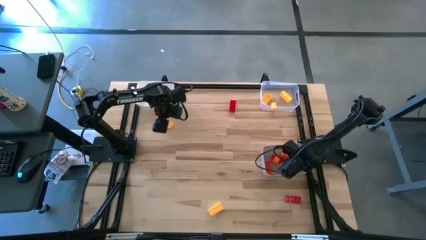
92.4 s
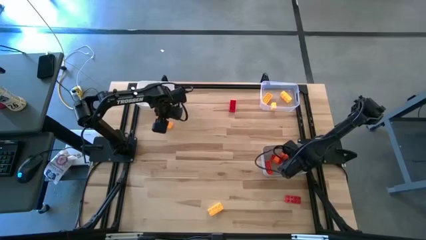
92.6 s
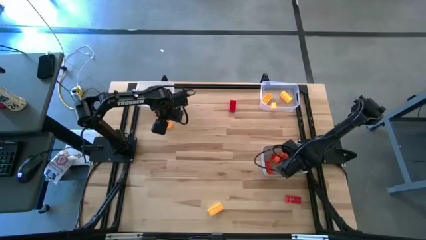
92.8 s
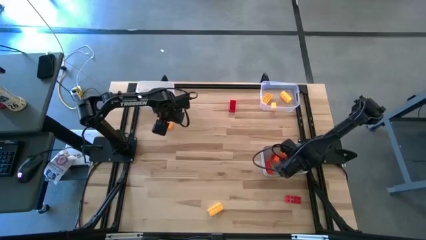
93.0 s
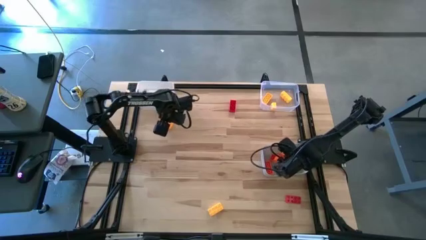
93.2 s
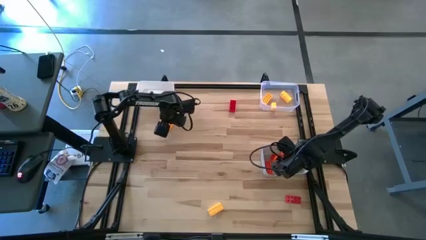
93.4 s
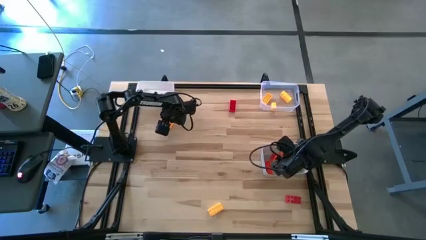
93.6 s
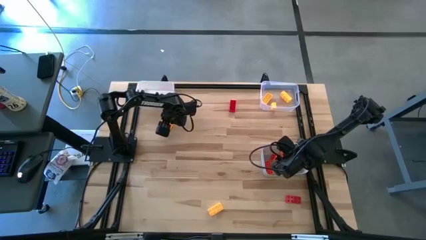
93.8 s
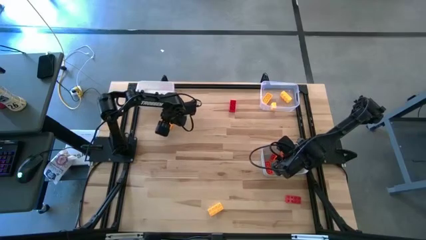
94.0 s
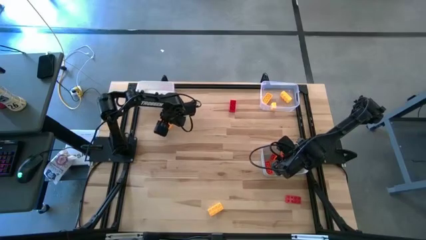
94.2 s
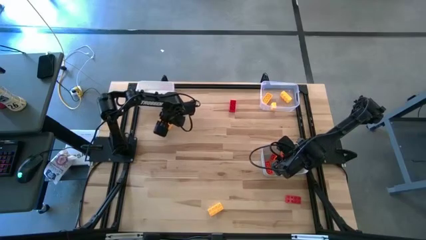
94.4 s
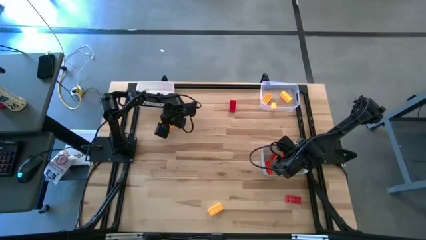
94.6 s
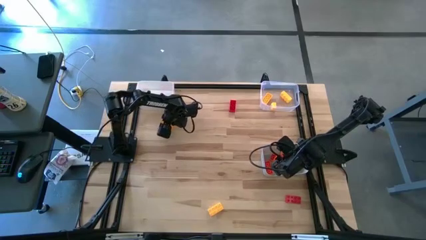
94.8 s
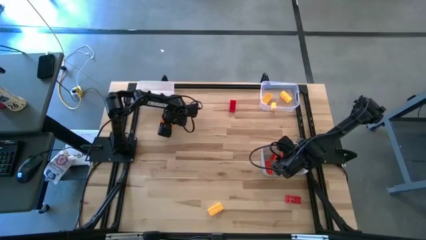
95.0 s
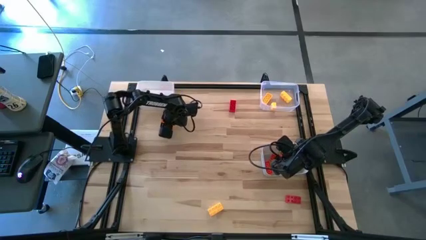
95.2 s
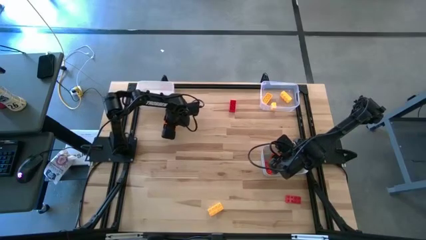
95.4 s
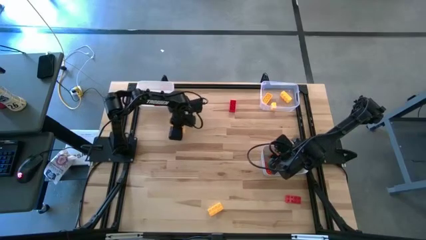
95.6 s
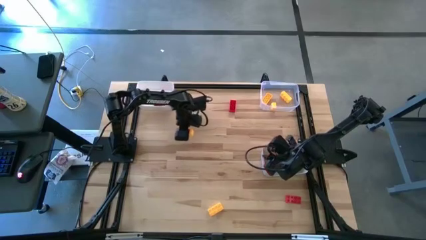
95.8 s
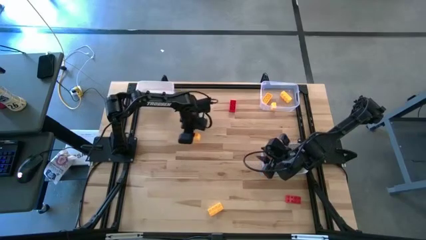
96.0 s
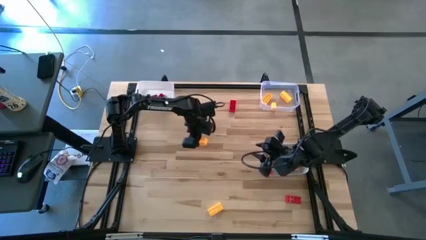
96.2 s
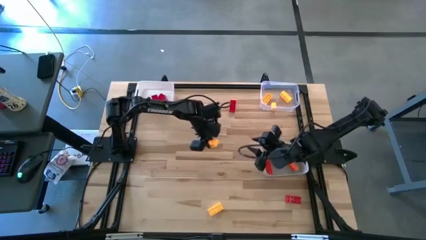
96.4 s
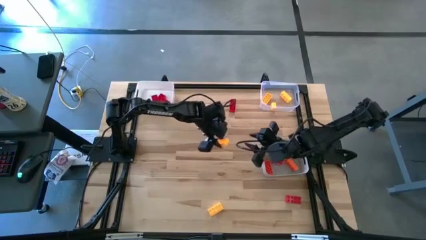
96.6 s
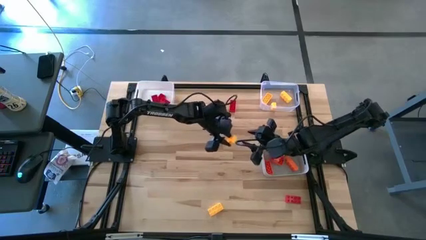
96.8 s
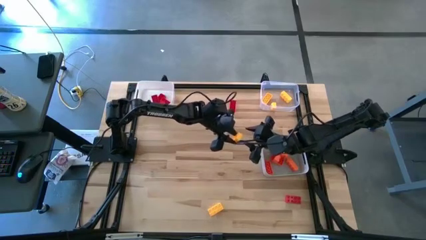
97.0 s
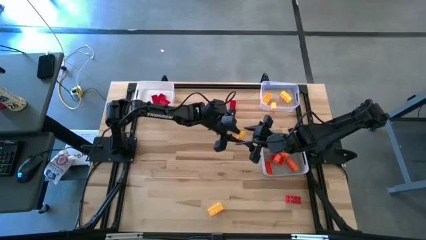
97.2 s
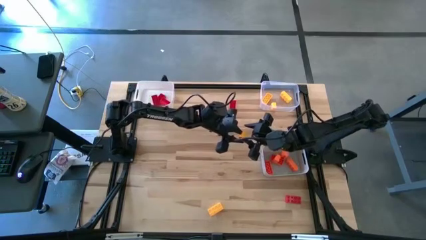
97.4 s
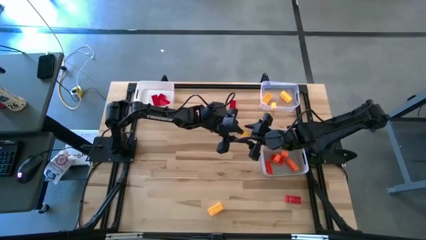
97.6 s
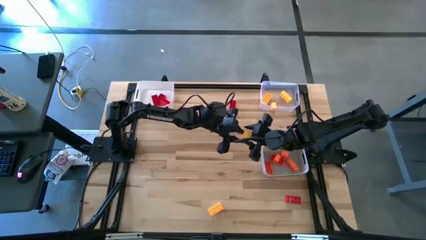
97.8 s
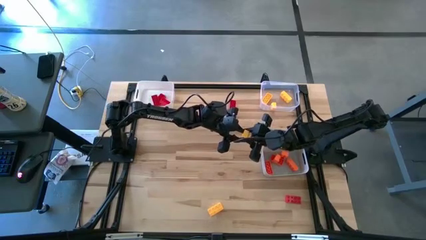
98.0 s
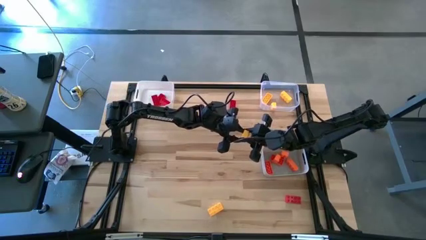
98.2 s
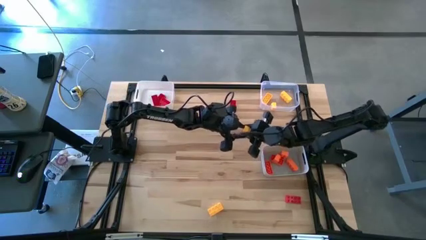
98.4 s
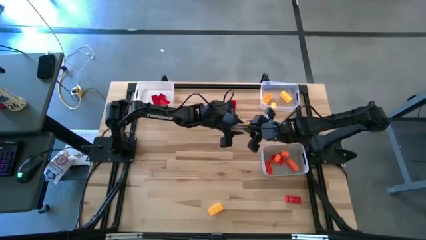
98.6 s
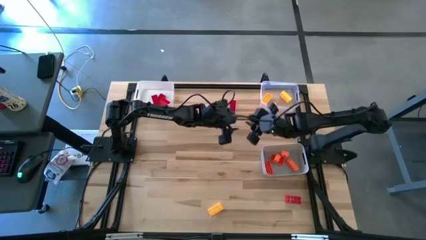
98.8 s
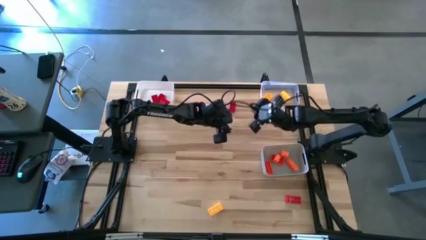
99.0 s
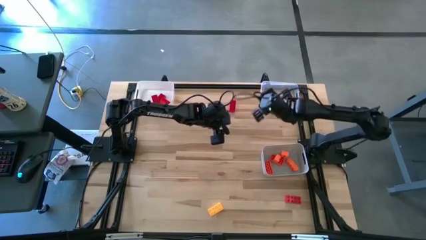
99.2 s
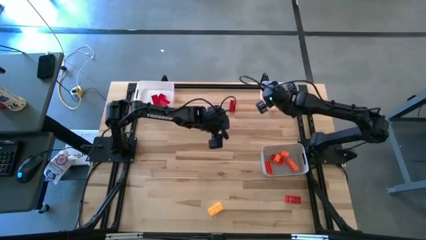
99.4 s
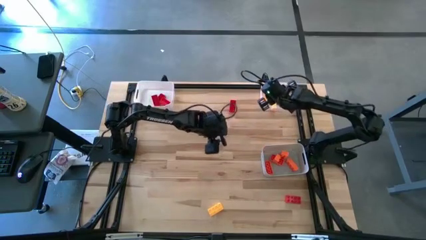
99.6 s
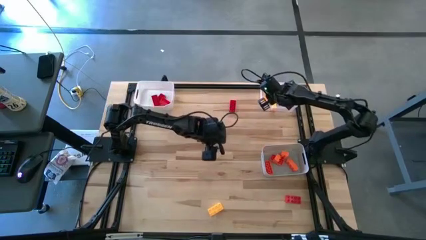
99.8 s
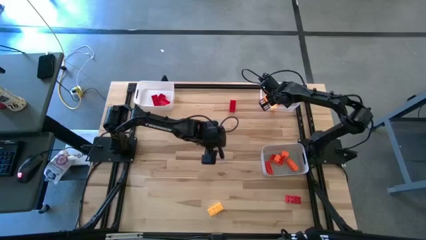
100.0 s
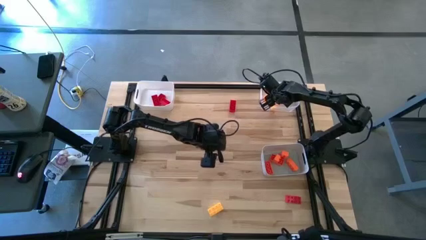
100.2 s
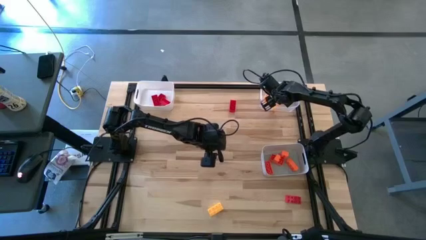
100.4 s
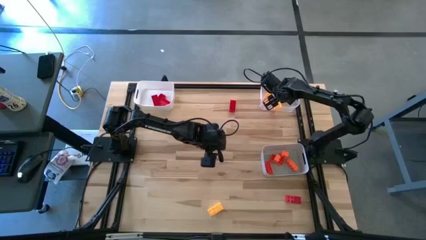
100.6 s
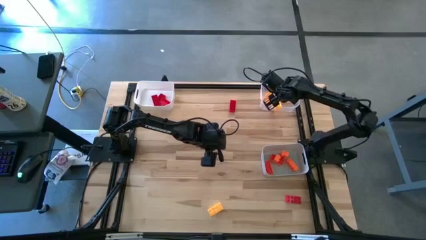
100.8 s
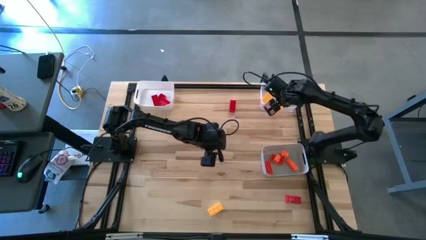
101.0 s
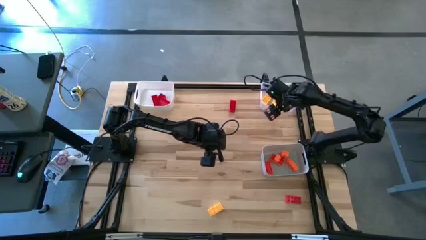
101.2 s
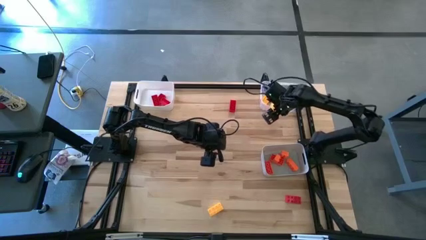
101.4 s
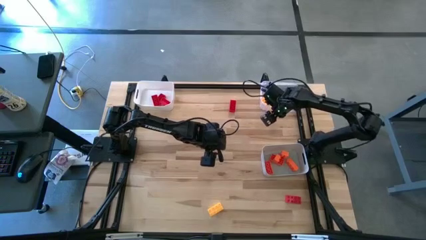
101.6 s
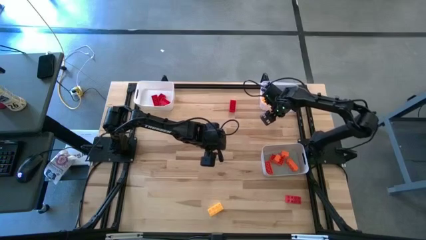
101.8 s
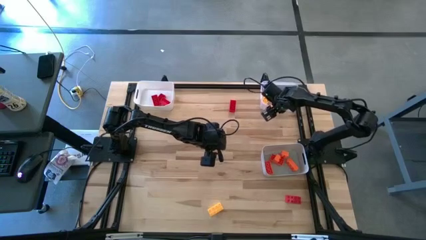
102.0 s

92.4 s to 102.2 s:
Task: Sort & place blocks by color
Put the yellow game piece into the transparent bin

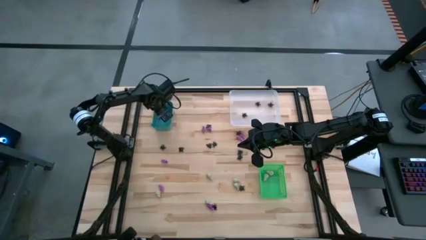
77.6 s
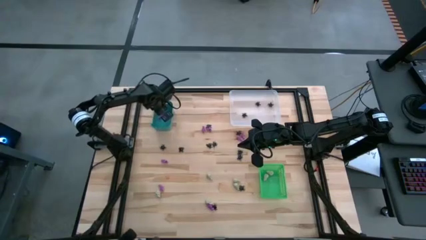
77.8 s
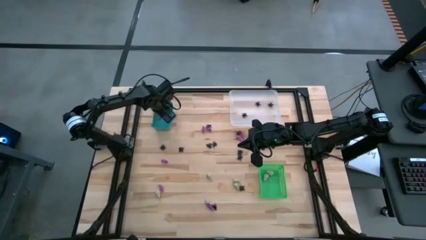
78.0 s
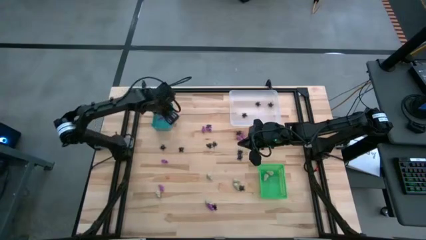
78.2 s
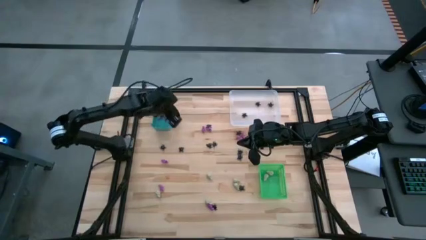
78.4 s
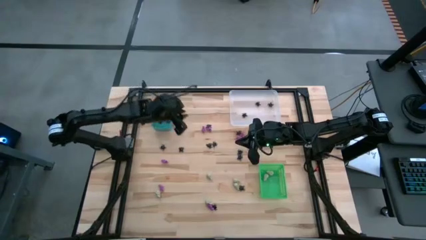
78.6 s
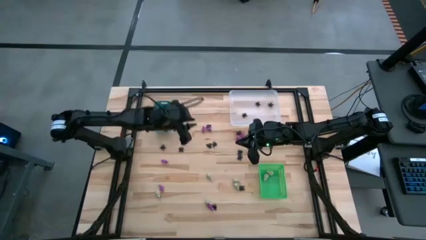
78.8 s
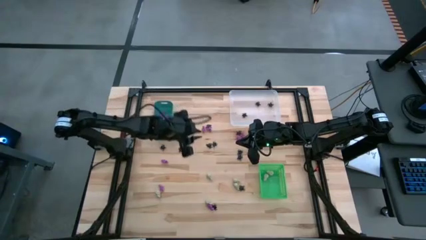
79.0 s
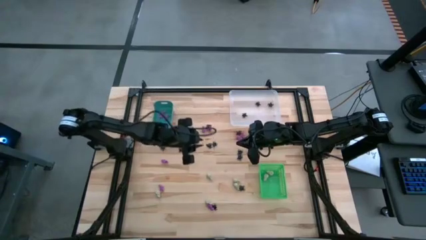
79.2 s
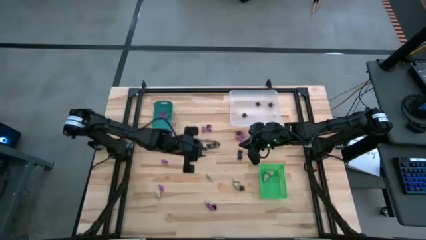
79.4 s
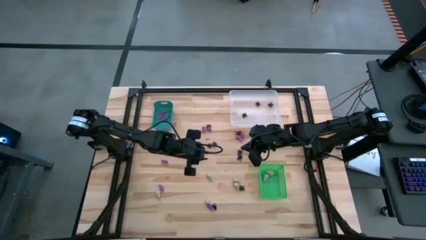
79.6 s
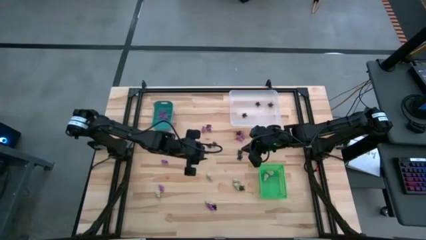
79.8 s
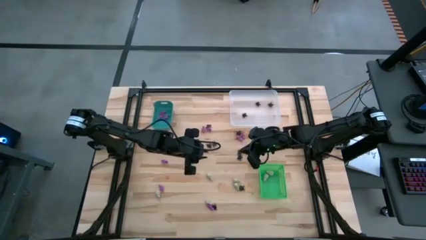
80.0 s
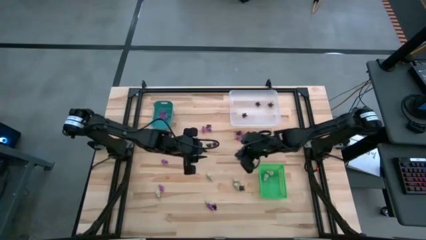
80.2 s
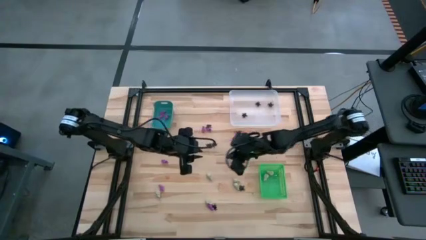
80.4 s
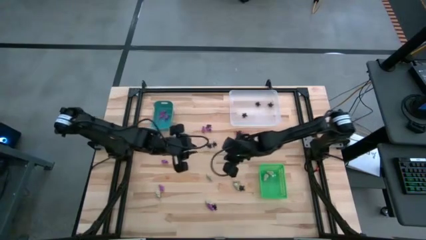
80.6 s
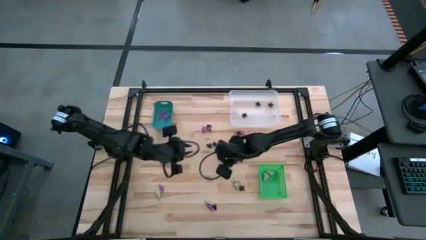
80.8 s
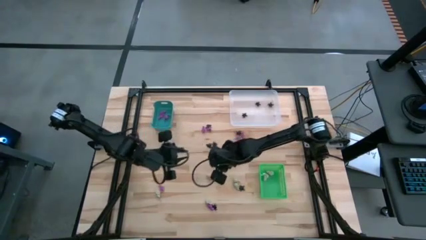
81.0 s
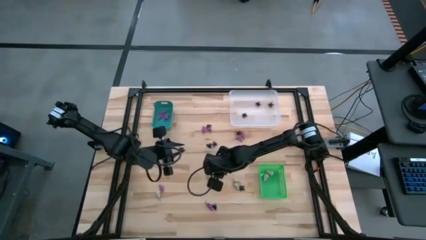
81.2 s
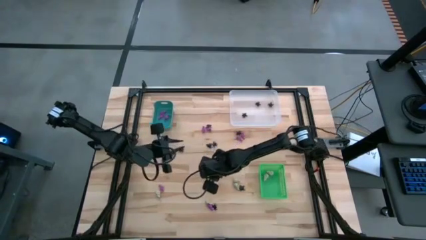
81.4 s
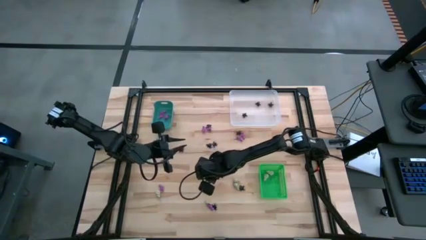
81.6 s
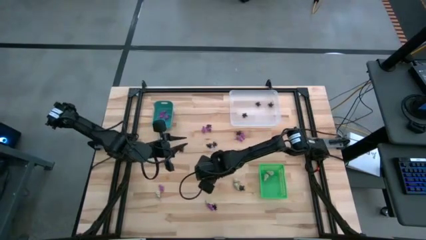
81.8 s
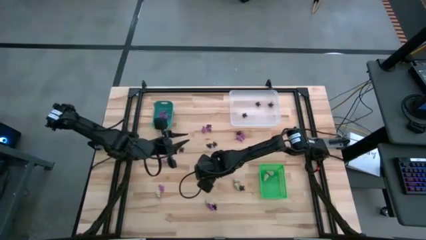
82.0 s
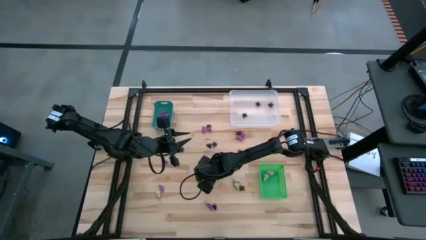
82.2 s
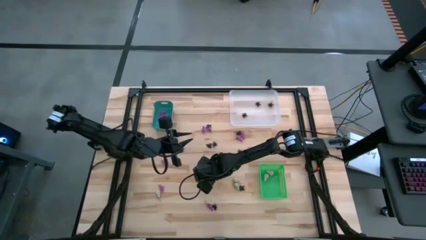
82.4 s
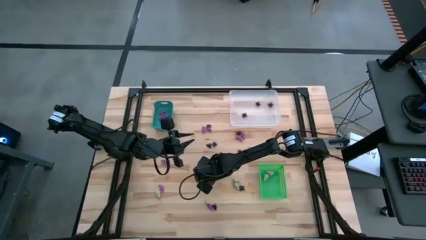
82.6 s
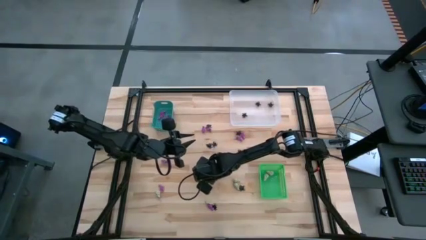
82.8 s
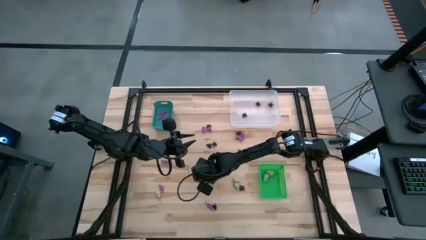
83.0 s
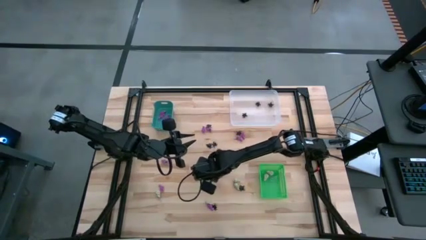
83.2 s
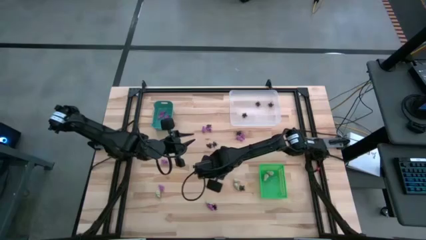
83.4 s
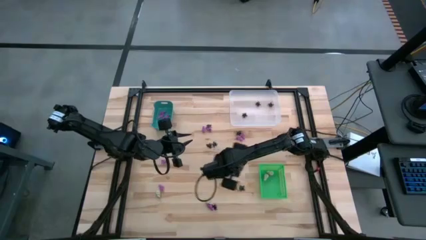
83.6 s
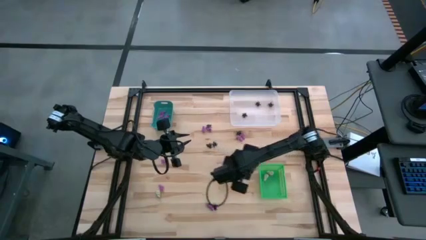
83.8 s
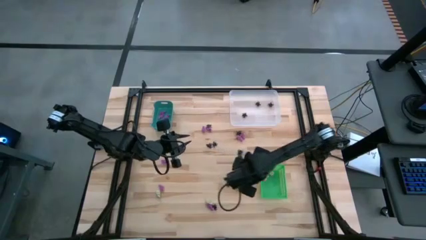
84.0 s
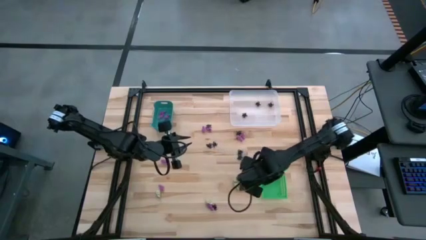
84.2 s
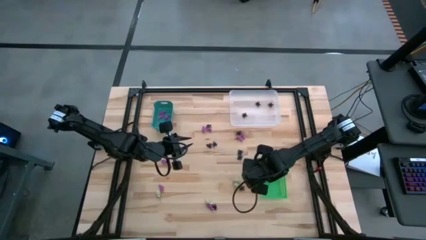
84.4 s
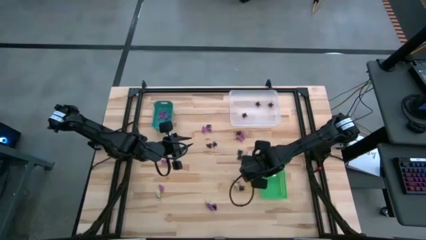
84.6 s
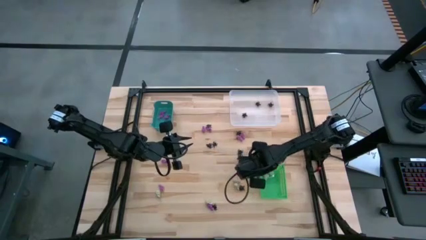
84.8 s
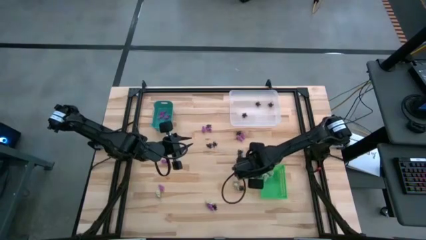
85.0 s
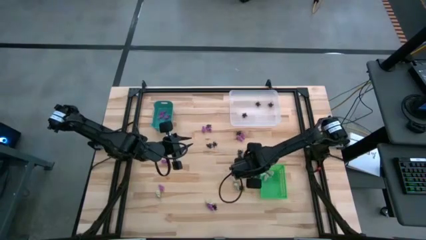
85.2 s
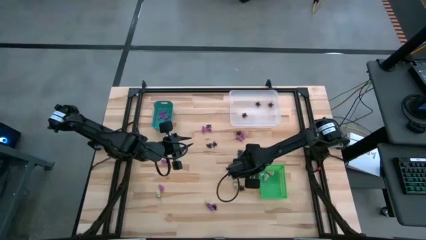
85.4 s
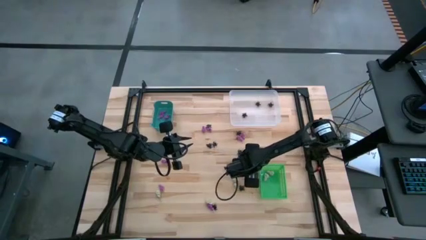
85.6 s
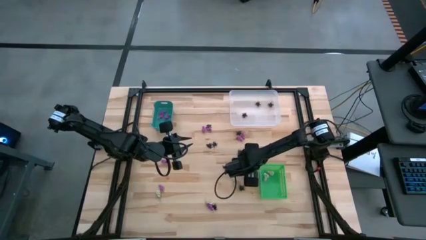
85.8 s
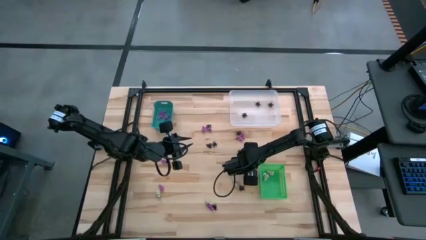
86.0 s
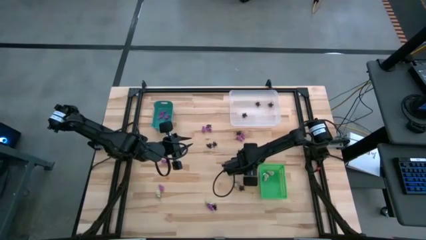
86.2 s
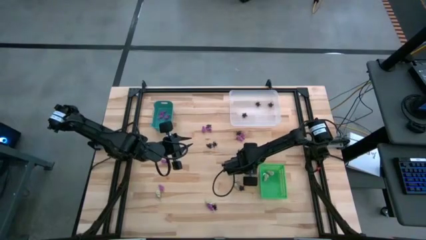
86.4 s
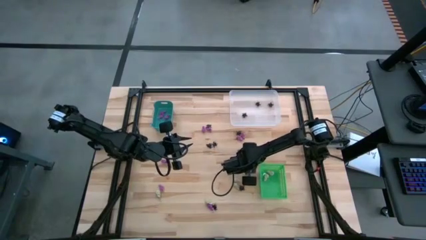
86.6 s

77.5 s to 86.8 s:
Task: Sort Halloween decoration
Put the white skull toy into the green bin
